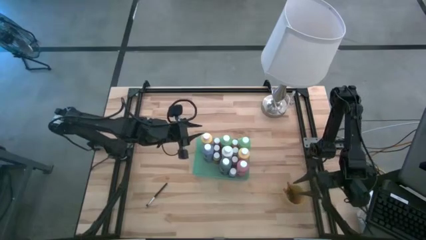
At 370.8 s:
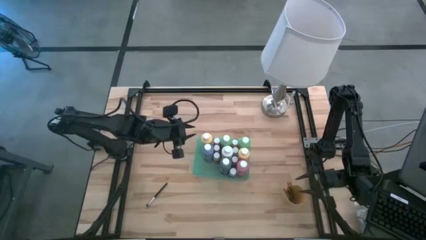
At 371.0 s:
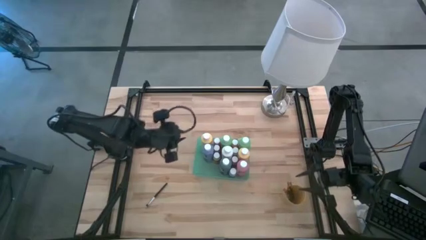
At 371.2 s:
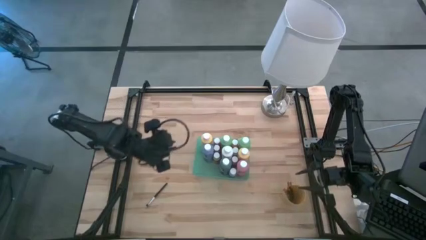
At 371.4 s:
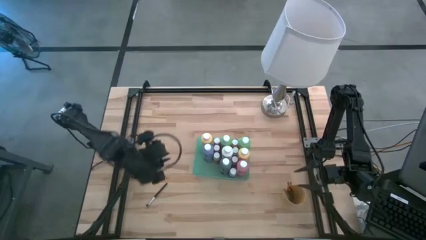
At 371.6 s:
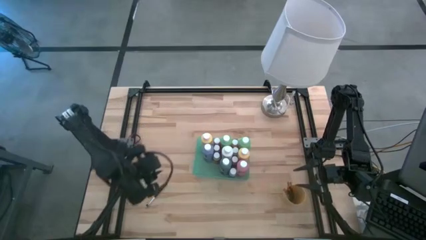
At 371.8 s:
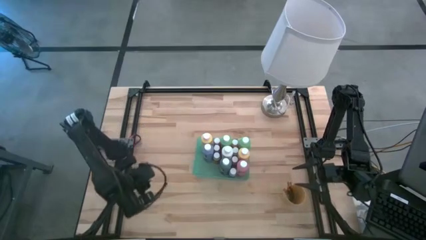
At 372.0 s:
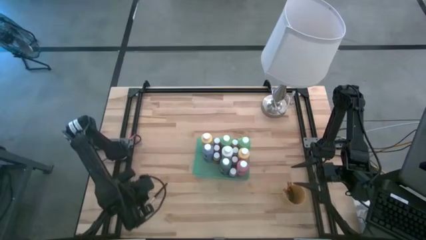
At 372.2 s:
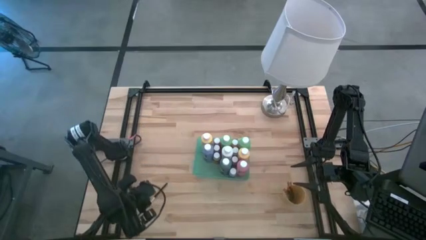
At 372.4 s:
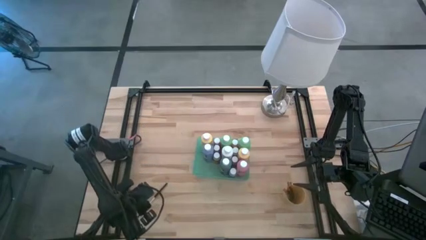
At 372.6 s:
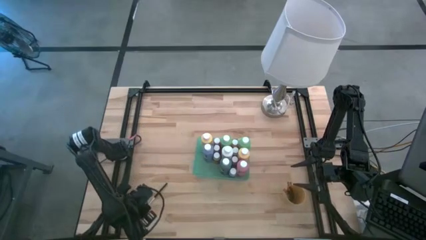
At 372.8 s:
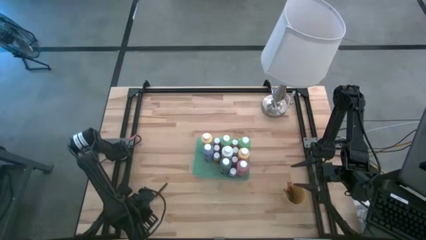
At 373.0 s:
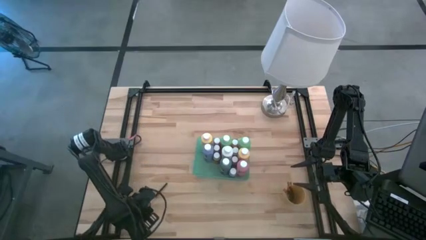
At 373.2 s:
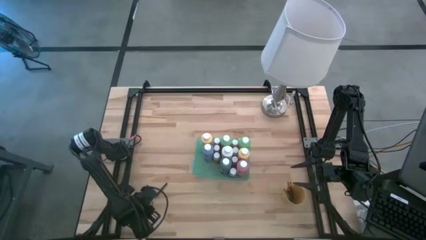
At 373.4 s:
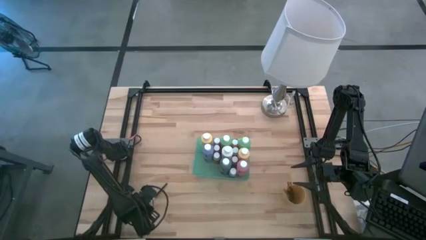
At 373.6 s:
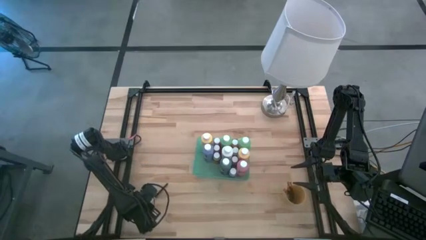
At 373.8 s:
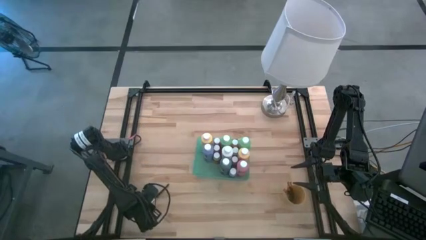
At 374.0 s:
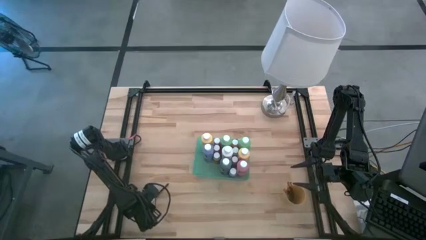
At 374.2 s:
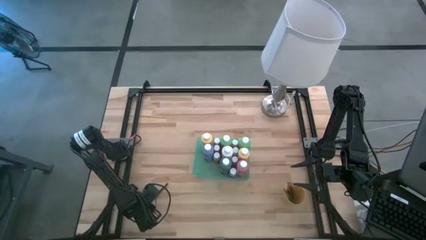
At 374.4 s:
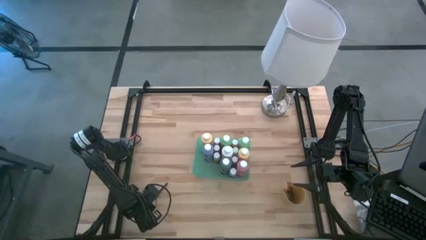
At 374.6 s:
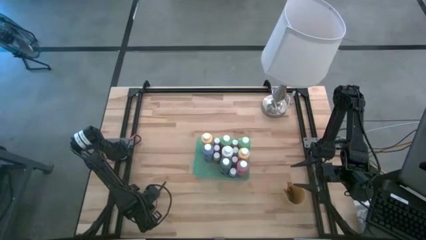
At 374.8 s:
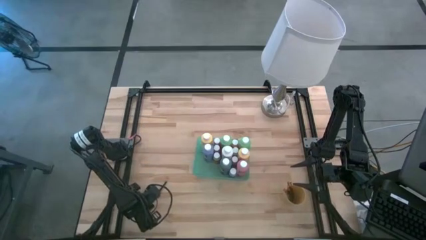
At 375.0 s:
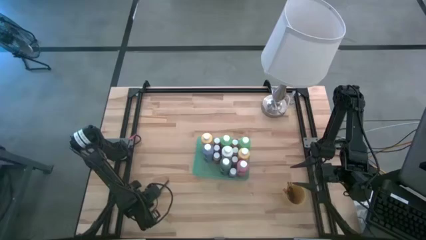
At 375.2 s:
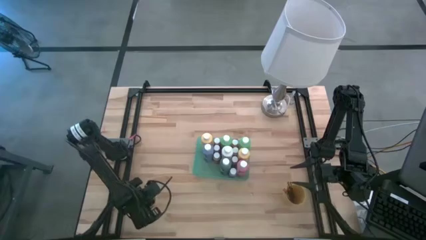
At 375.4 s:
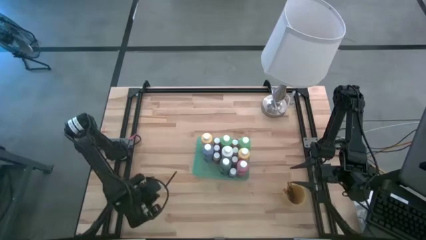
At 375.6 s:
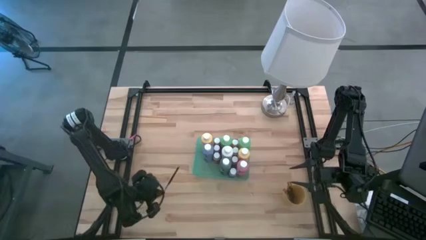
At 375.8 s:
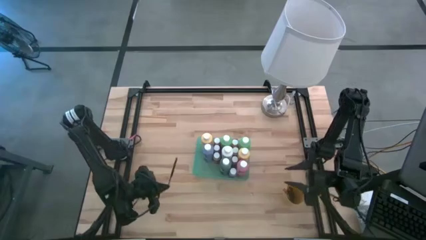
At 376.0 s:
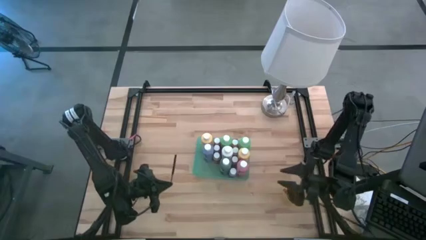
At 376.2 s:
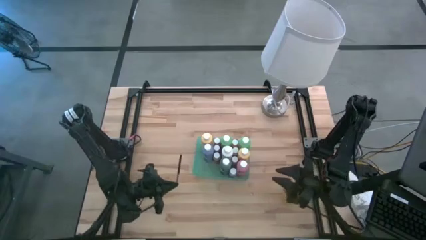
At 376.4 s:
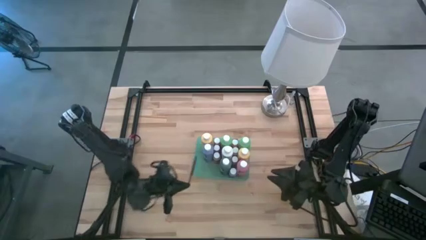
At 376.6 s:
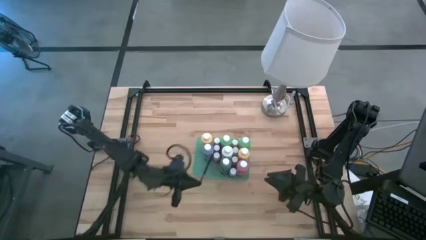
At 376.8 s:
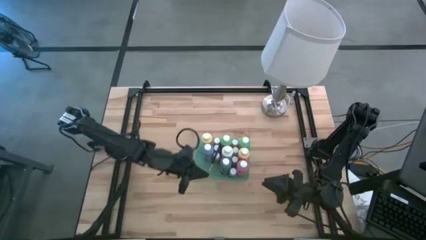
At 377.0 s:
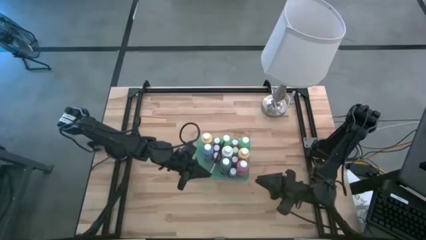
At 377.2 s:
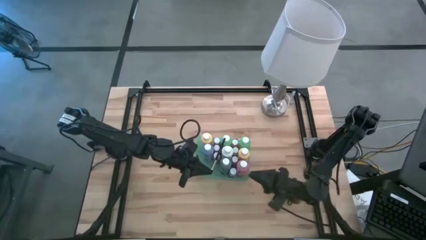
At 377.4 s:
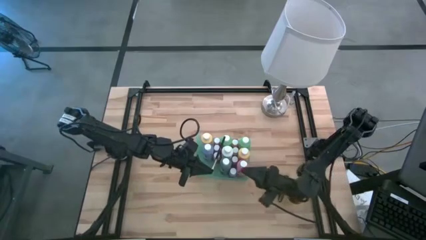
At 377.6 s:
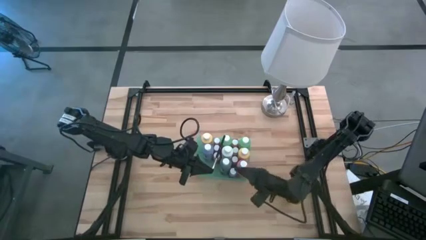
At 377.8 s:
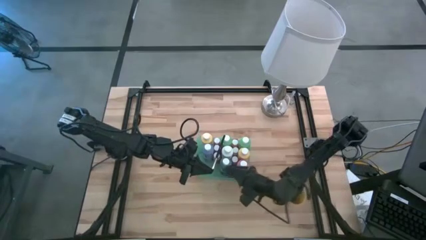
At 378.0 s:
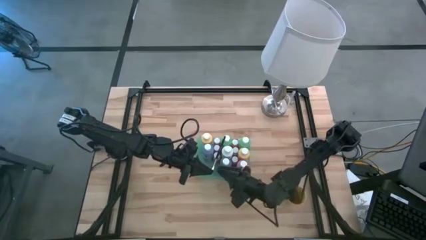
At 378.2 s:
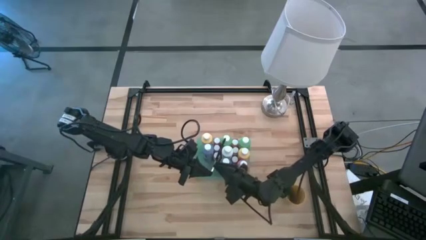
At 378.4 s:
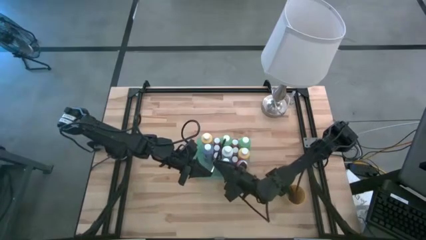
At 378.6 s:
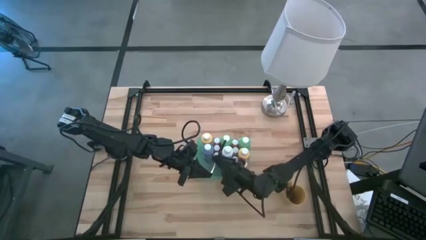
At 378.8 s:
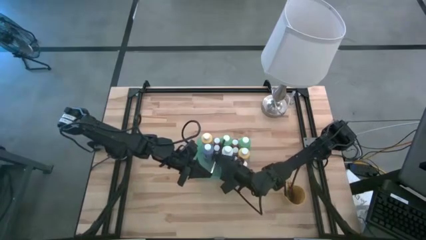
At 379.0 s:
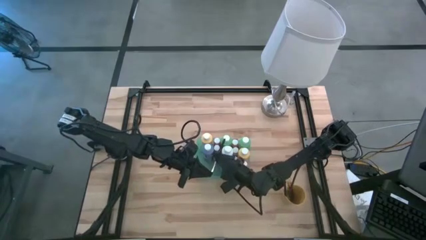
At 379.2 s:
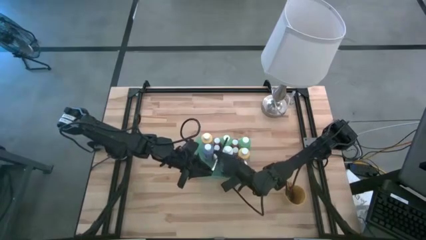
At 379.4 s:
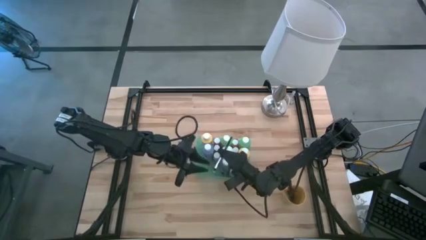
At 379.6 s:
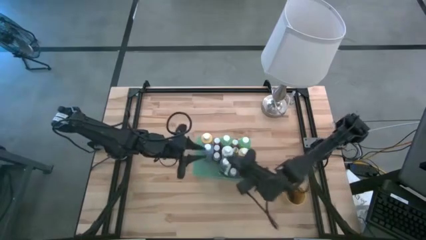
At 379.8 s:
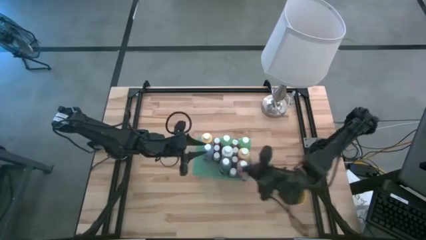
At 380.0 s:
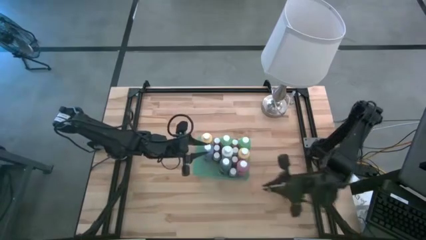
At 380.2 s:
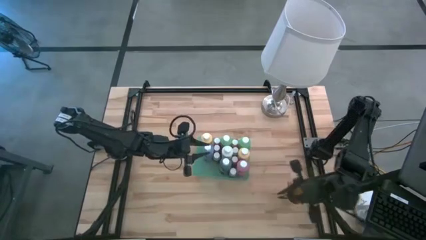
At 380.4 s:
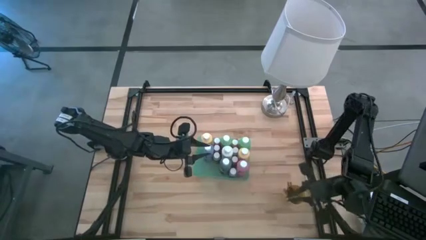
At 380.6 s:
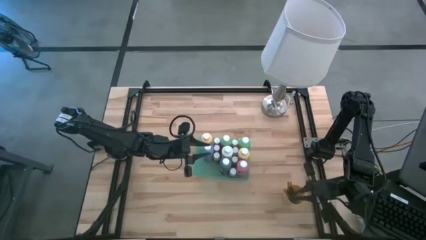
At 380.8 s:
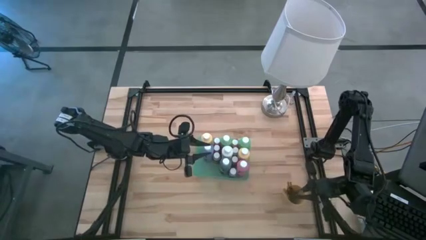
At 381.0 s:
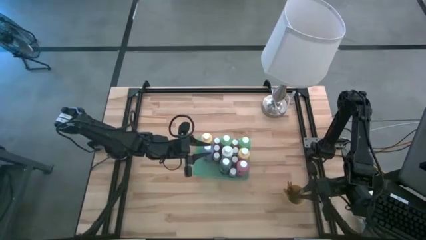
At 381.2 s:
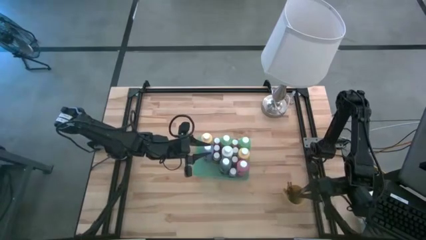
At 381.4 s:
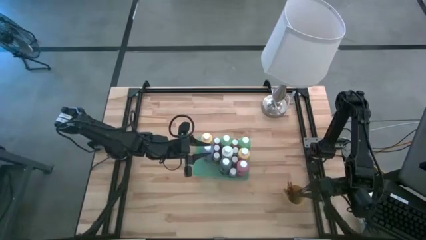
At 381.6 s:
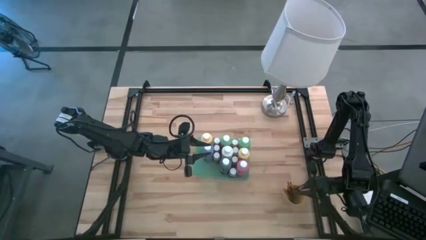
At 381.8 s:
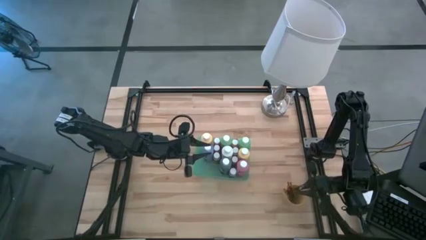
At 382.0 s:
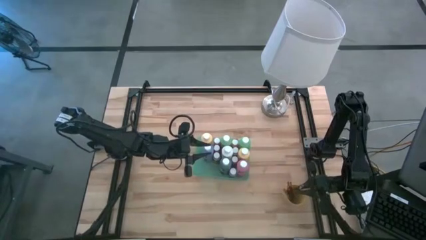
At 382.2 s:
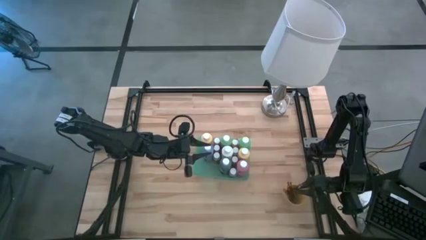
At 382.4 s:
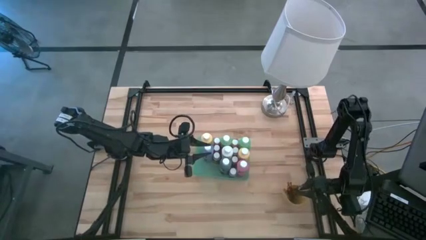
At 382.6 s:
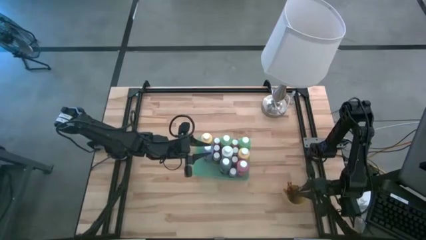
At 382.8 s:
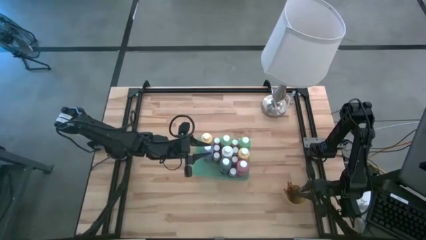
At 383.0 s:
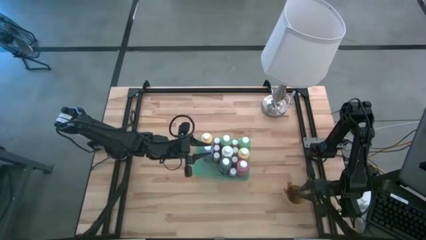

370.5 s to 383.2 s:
Task: Pick & Place Paint Supplies
Put the silver paintbrush into the yellow cup

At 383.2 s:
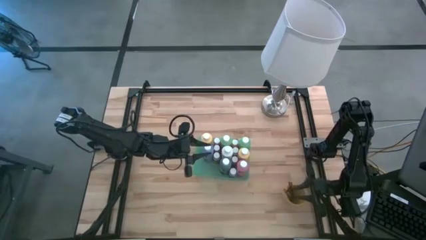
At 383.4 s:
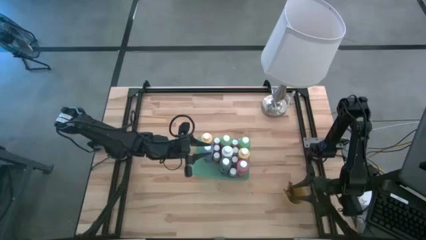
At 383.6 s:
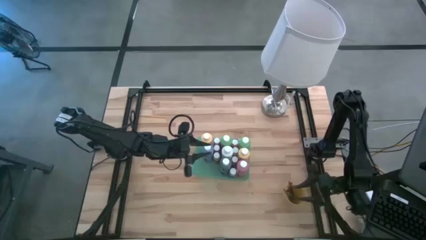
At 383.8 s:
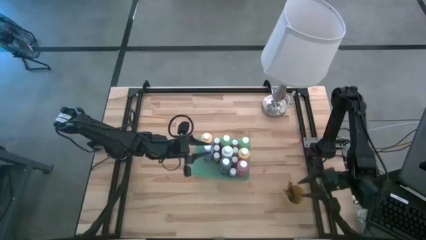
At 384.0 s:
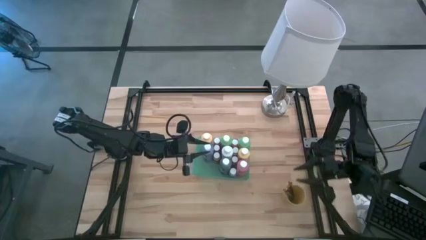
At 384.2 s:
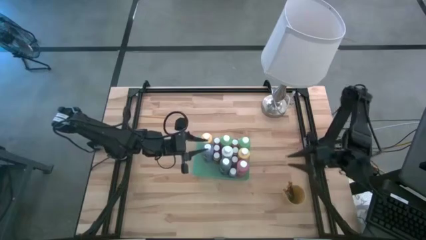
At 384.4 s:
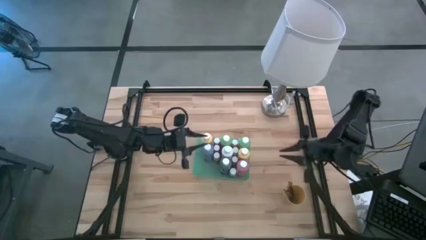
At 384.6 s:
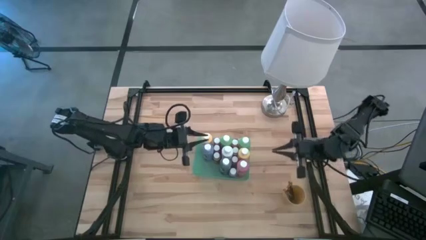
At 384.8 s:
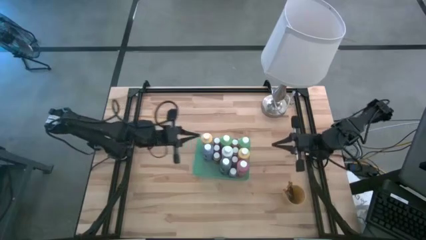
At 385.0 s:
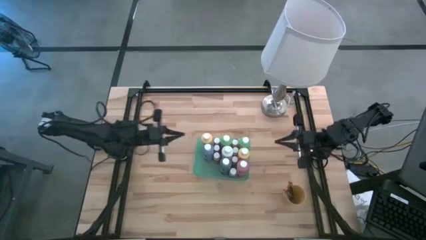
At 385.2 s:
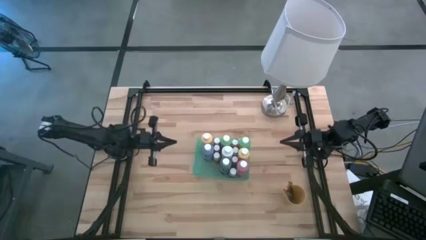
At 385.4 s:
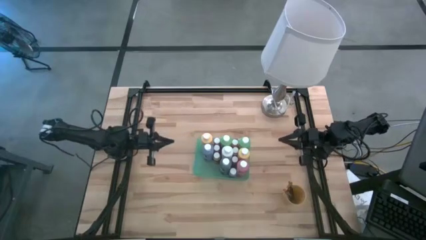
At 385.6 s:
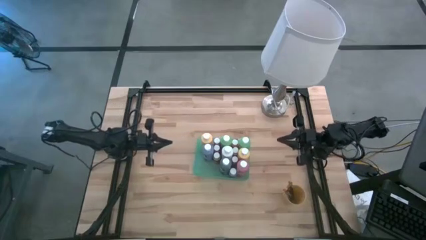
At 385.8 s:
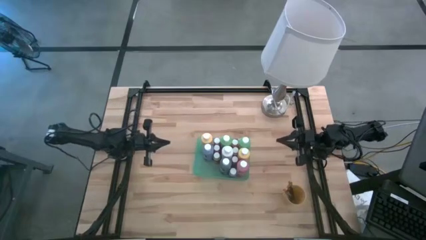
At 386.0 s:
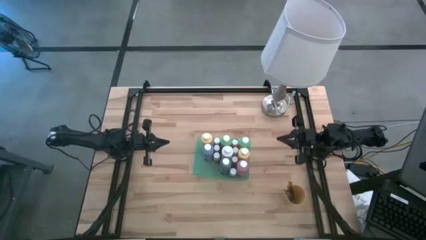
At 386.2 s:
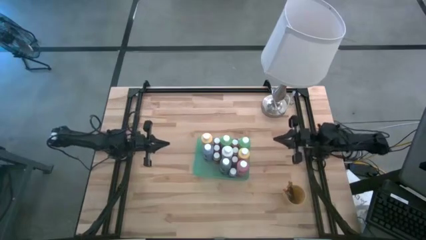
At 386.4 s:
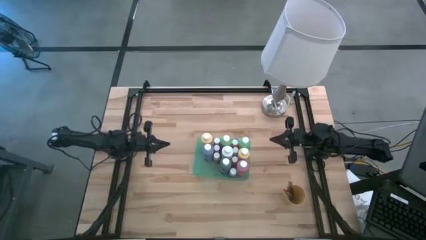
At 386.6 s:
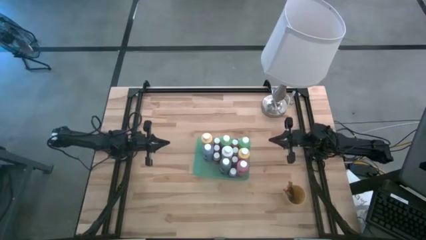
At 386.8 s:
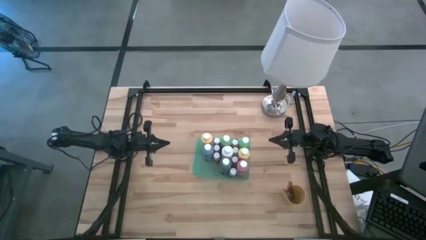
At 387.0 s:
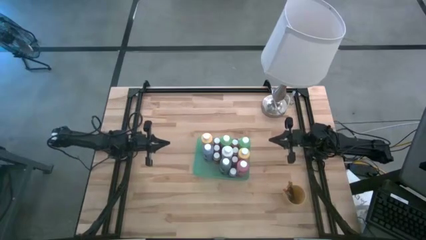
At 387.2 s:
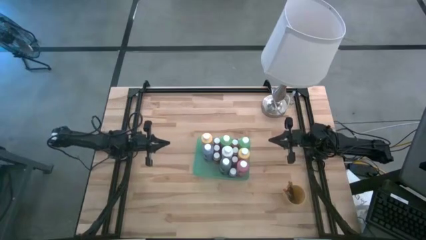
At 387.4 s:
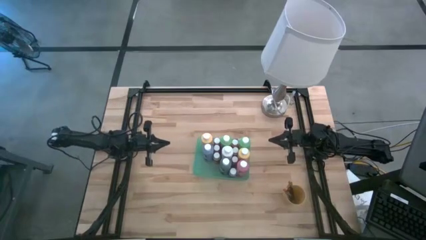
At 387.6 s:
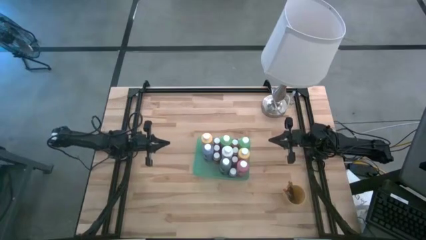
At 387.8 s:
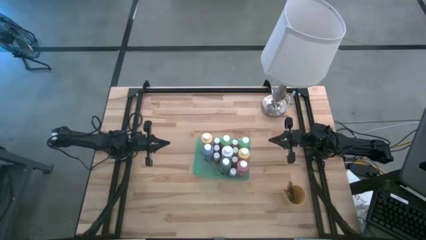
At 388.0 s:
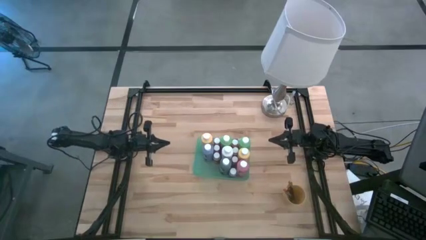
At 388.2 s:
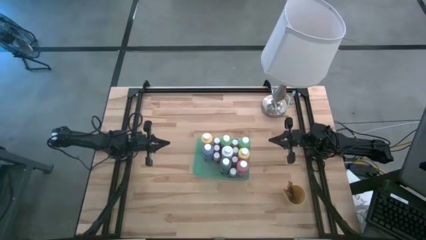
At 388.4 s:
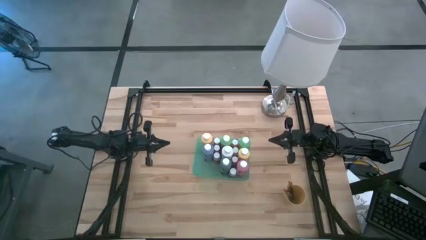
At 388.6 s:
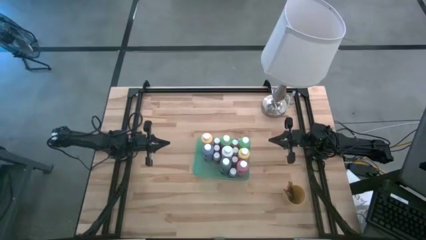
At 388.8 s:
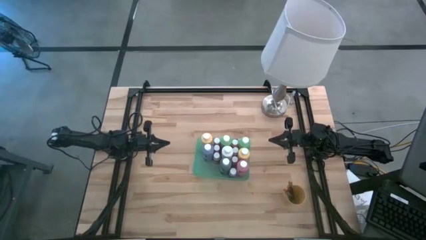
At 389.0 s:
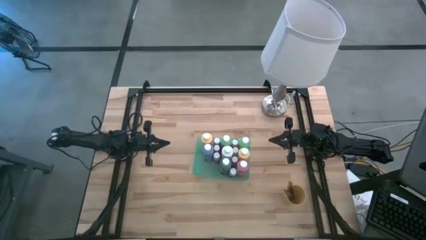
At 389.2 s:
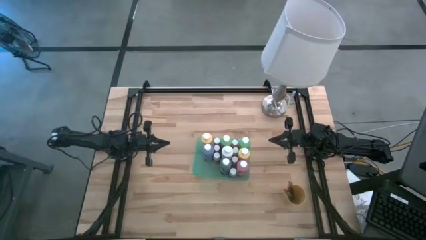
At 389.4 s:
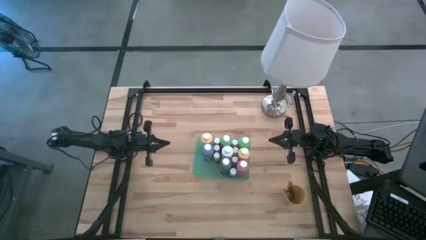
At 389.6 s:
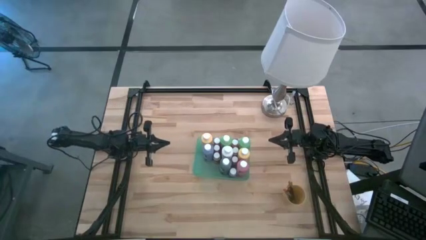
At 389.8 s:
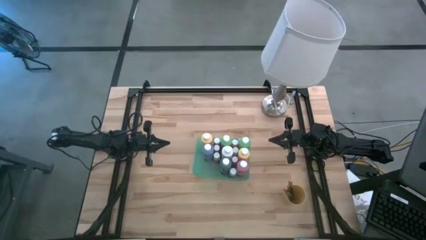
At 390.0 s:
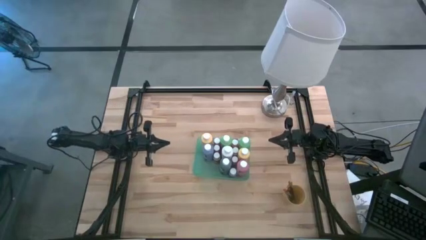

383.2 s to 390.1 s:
Return to Home Position
